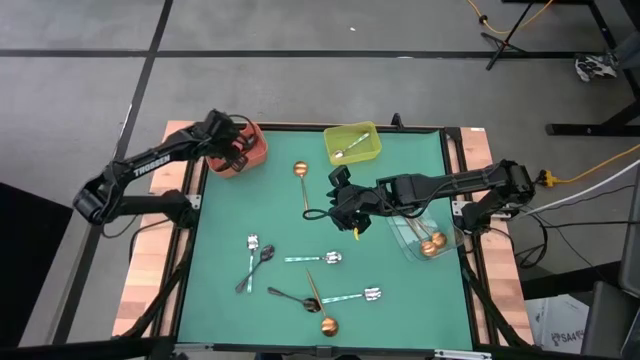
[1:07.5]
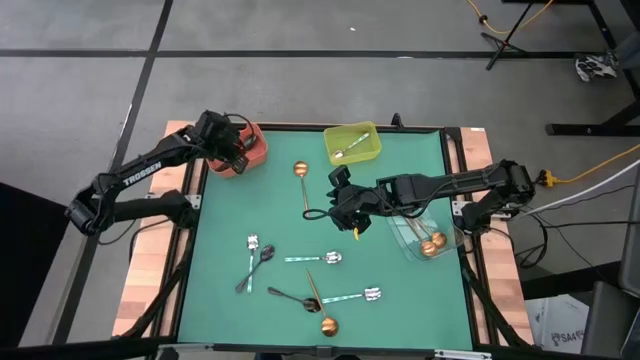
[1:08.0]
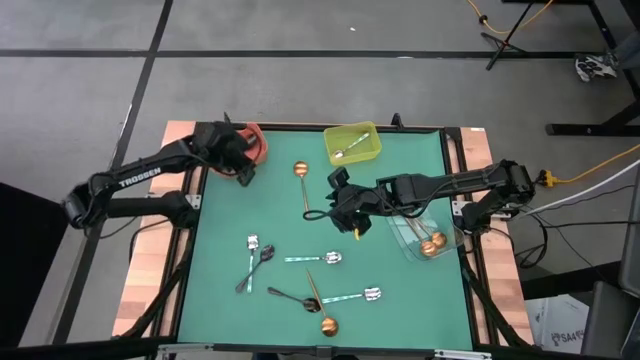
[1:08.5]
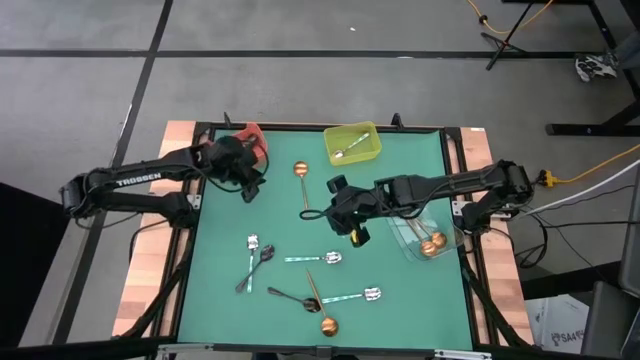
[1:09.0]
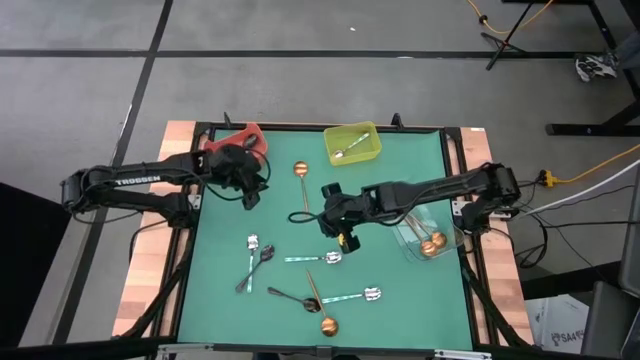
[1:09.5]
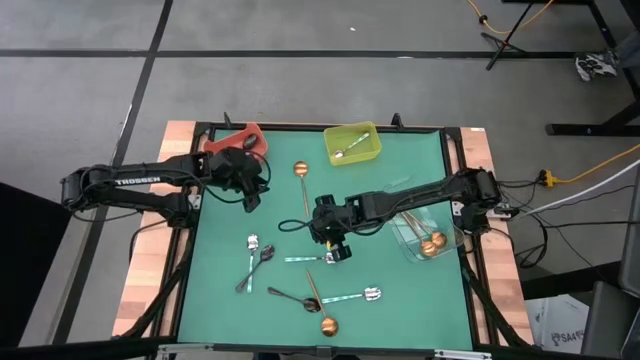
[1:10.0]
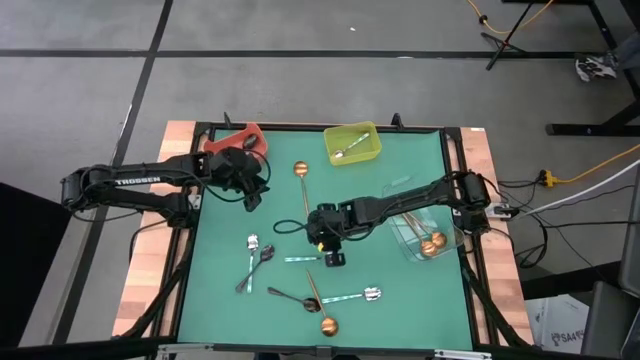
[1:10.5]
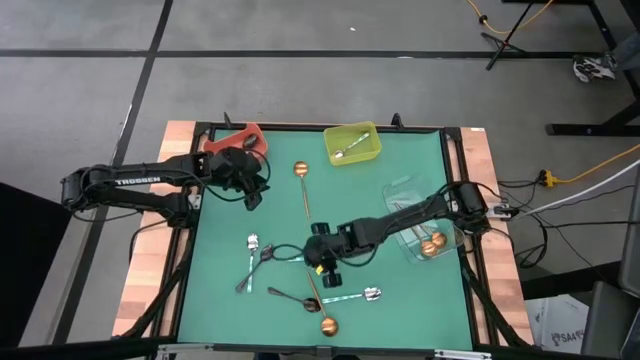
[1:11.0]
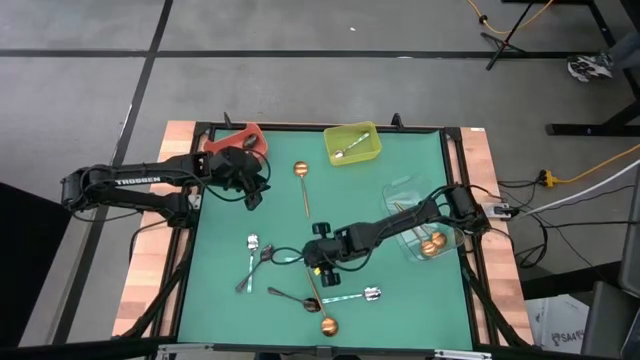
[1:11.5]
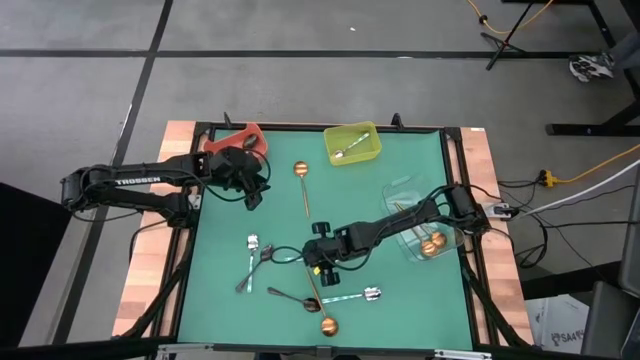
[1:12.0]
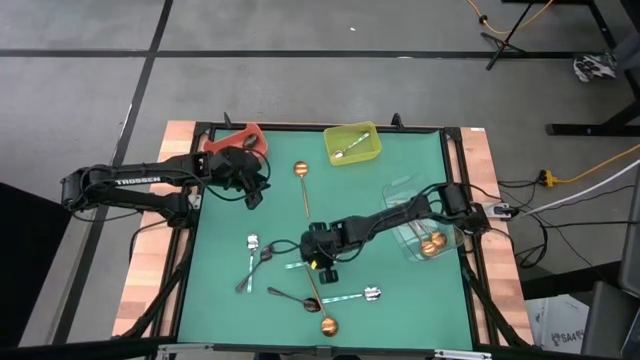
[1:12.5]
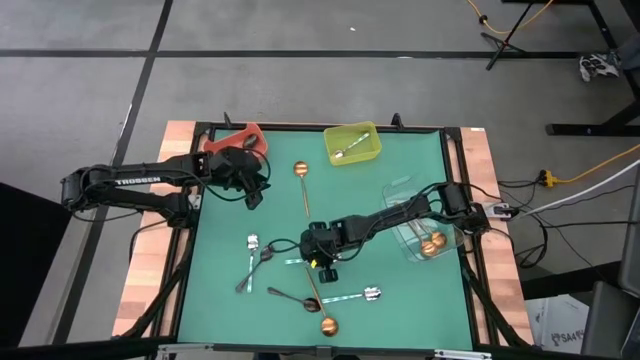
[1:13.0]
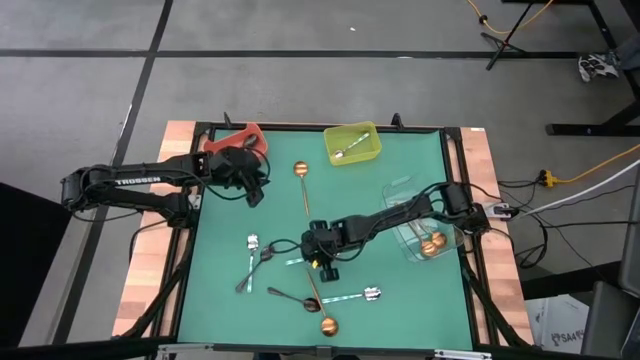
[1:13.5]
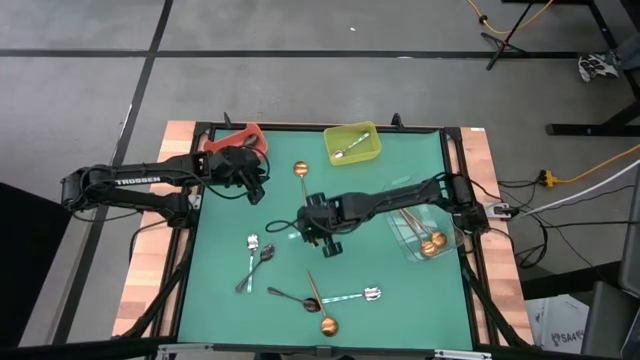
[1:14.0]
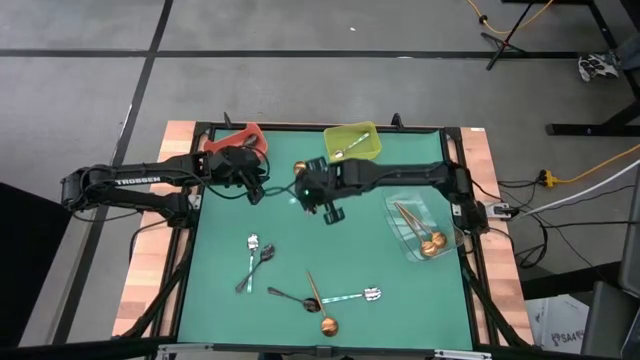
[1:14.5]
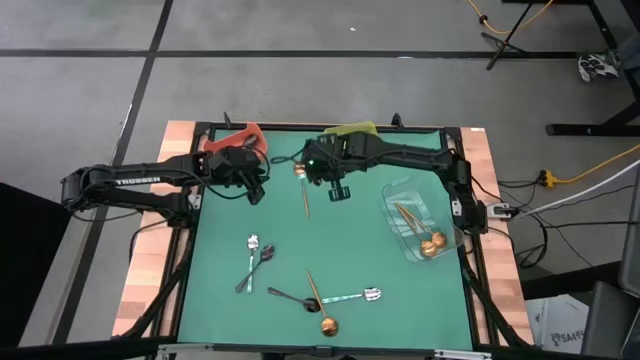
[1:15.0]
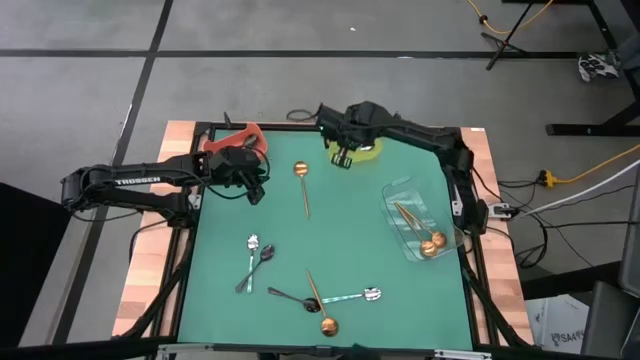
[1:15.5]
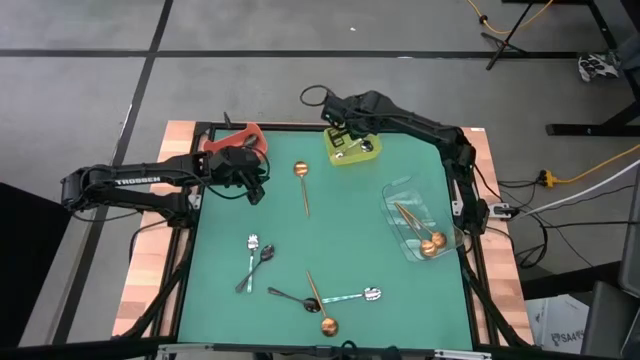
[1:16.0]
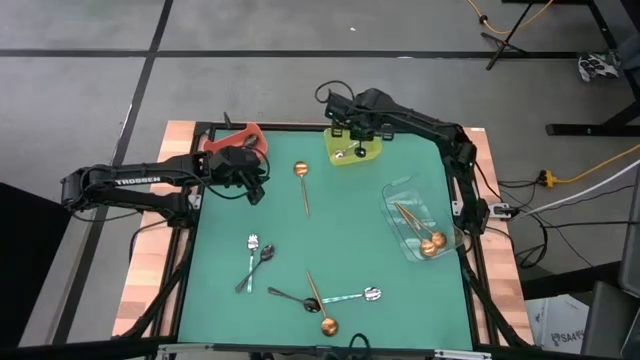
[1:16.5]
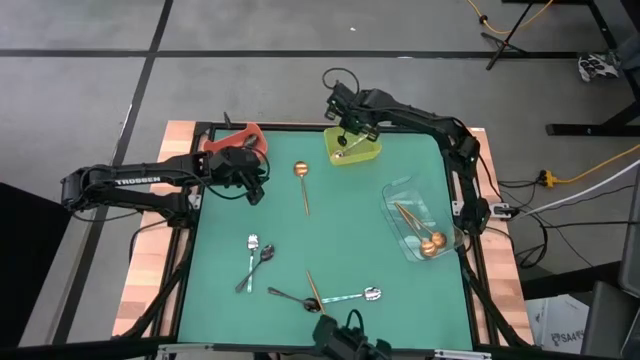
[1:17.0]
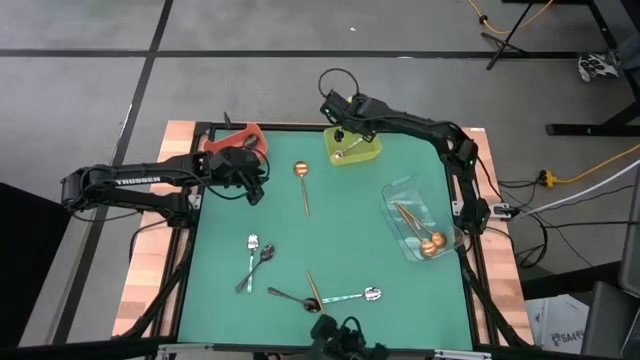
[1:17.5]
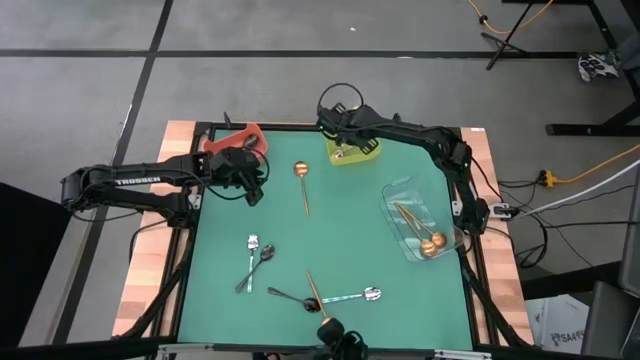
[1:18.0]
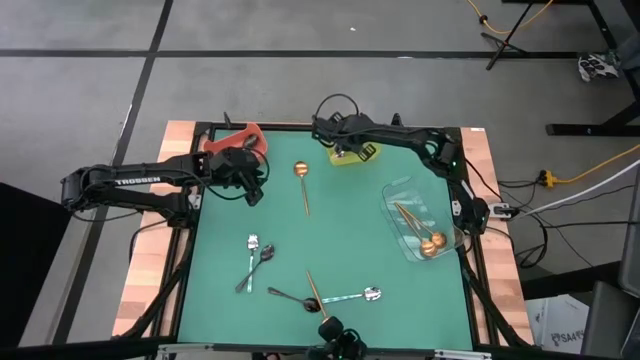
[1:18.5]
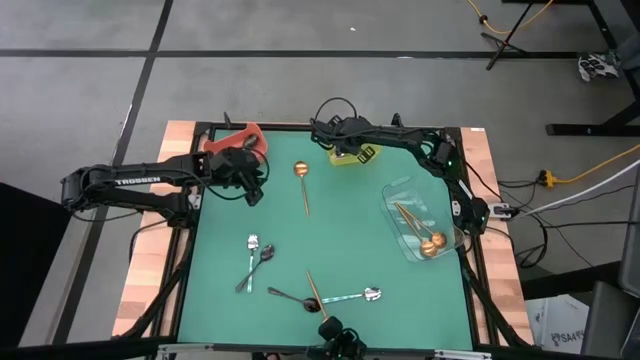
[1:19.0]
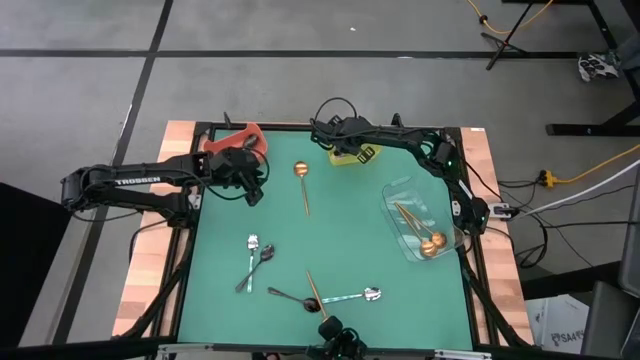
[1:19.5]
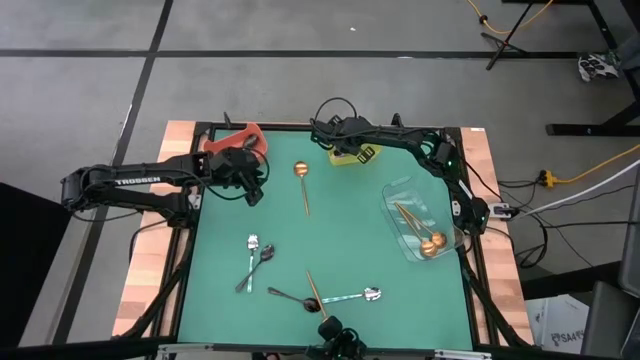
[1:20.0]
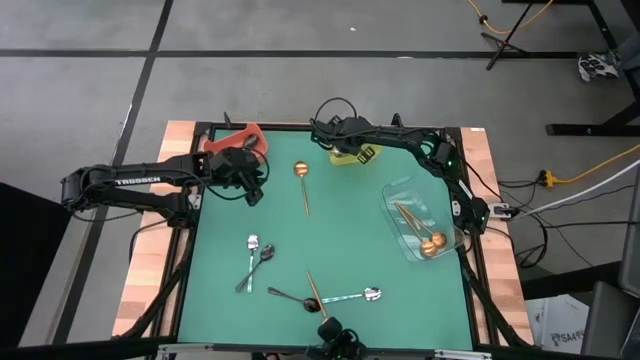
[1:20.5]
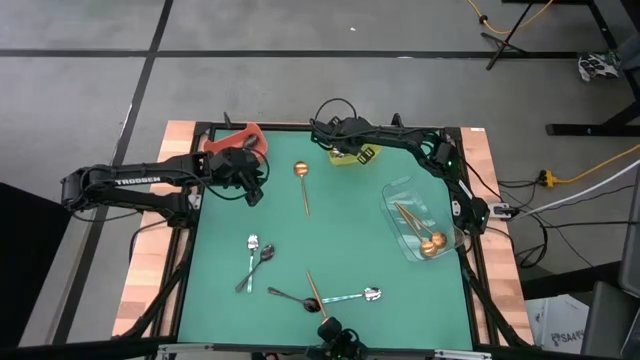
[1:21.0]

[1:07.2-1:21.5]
Task: Sort silverware by color (type)
Put the center white and green spoon into the yellow bin

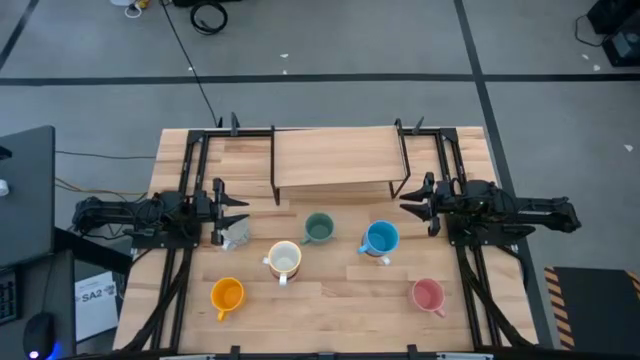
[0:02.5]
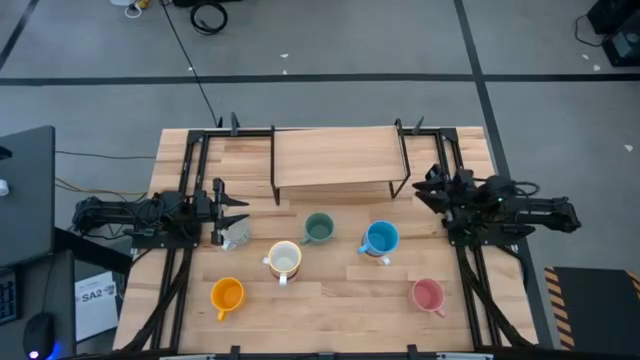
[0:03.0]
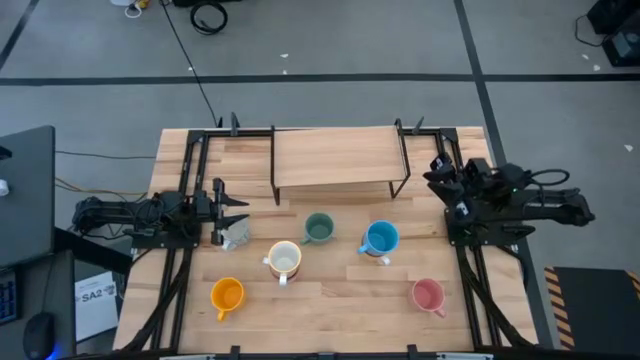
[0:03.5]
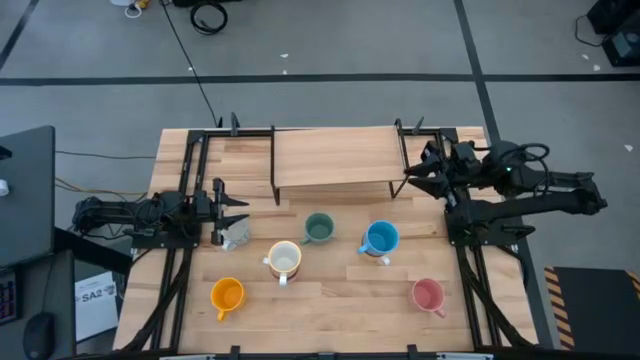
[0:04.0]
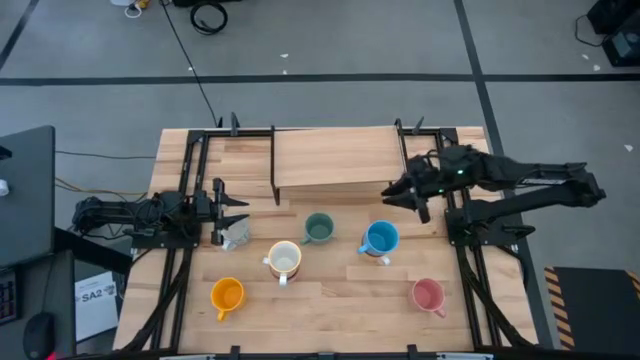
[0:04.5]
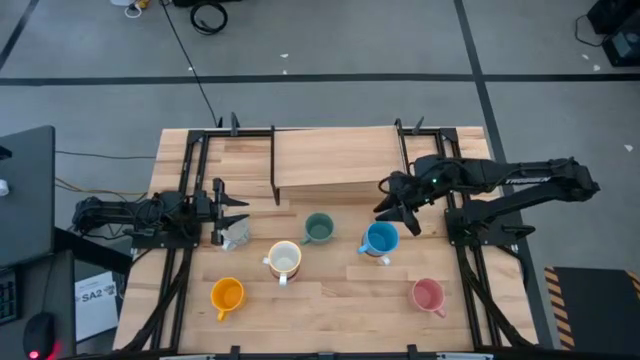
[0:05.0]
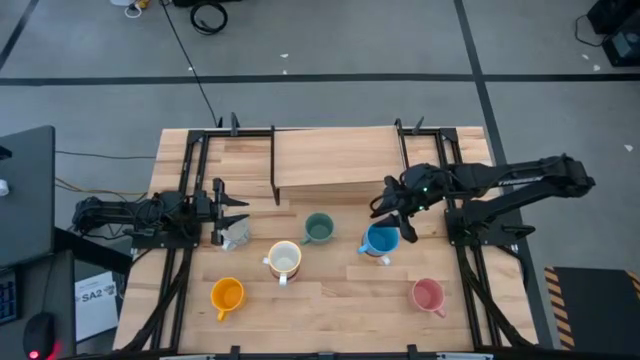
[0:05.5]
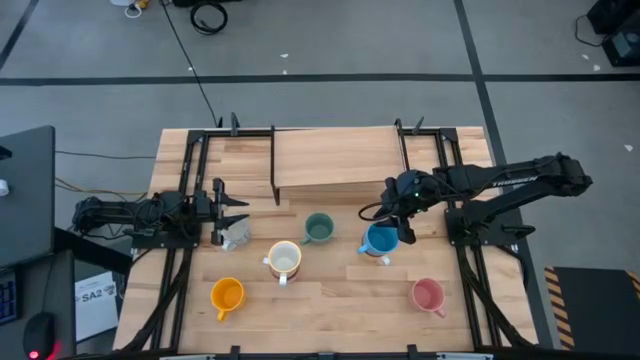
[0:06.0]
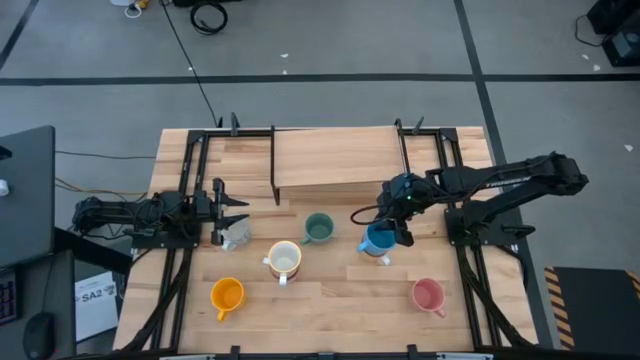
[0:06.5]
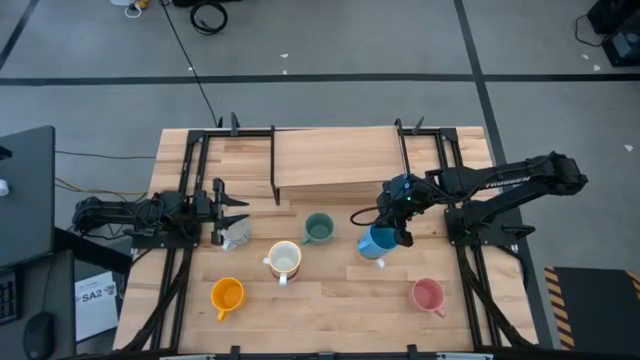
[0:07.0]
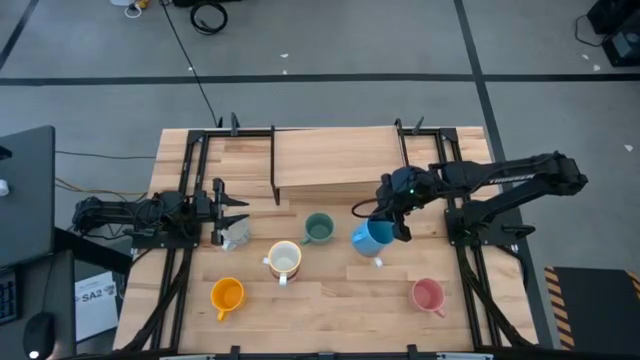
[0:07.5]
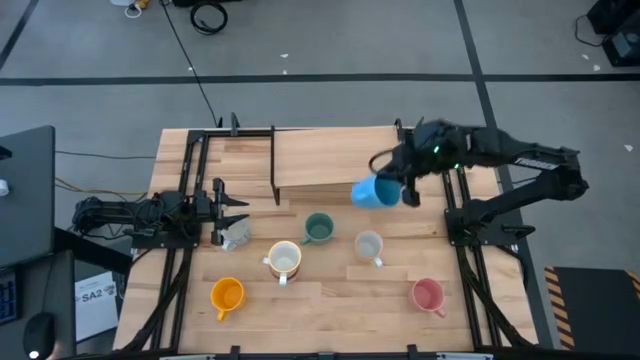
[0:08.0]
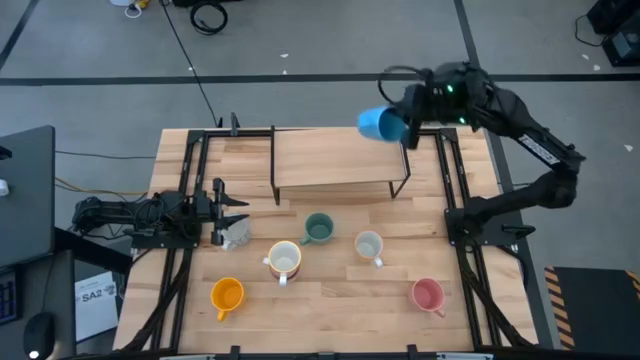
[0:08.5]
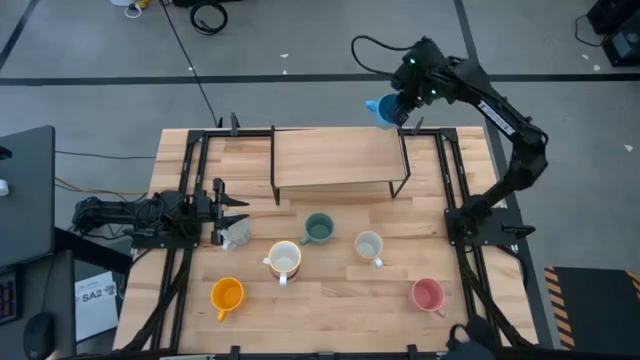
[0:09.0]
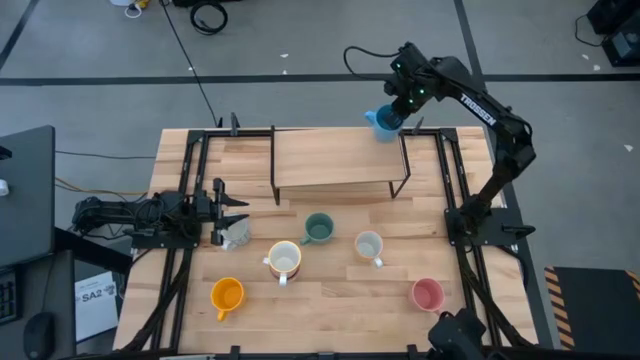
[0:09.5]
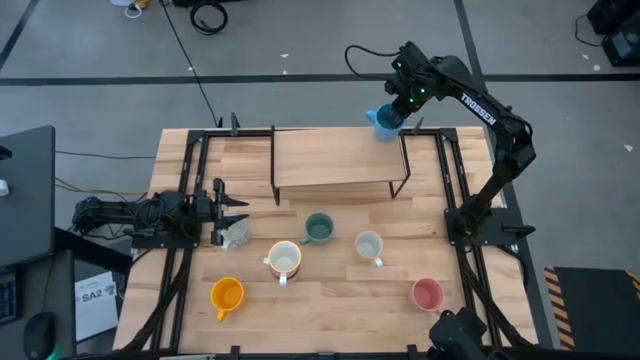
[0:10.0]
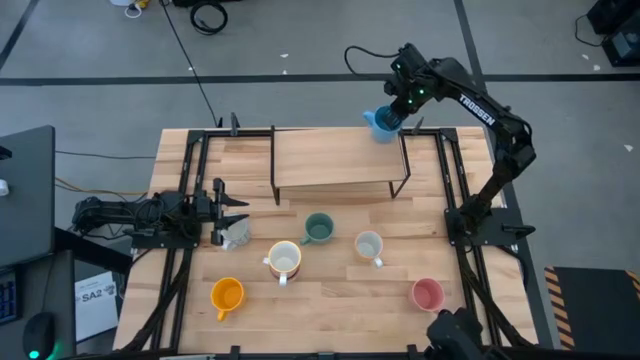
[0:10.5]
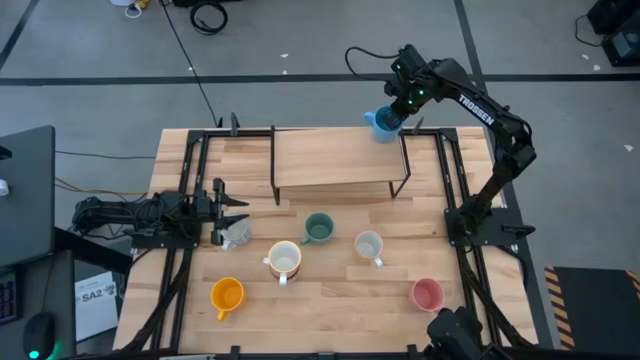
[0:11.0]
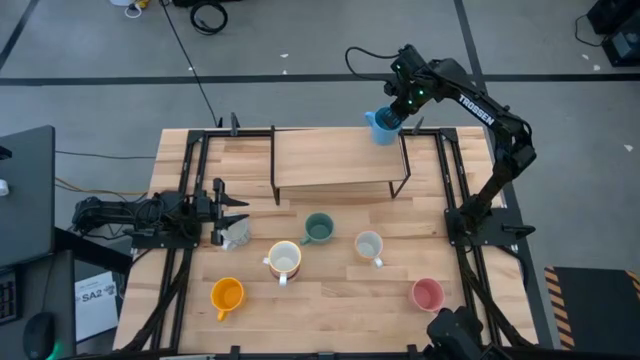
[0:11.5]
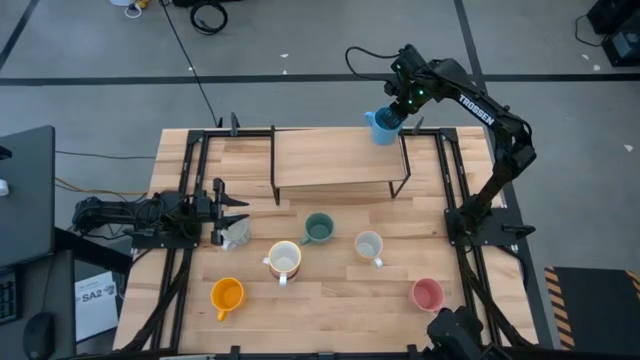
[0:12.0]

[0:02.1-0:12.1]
Task: Place coffee mugs
Put the blue mug on the shelf
